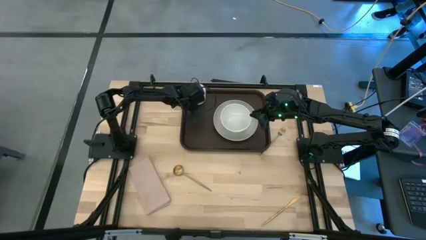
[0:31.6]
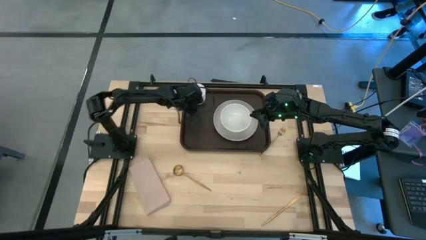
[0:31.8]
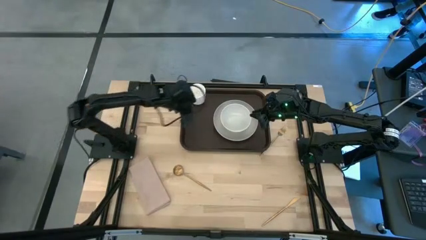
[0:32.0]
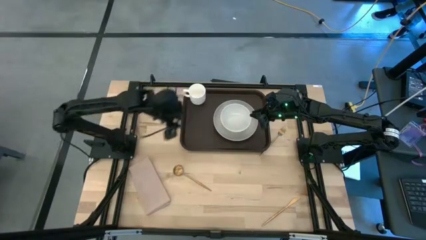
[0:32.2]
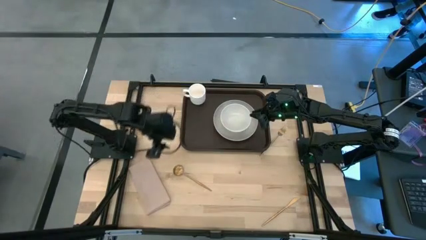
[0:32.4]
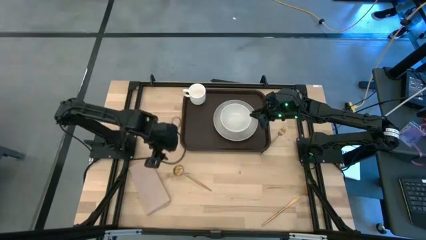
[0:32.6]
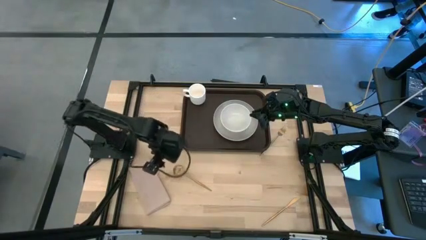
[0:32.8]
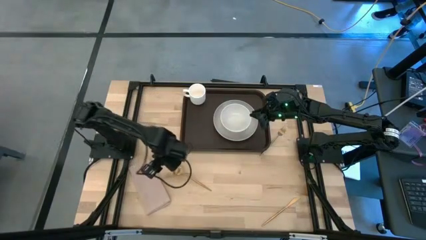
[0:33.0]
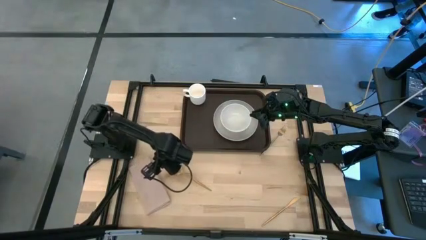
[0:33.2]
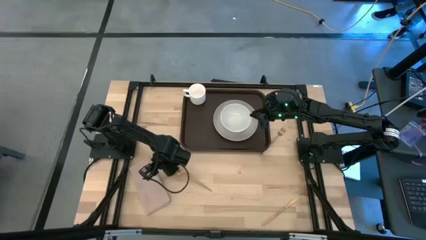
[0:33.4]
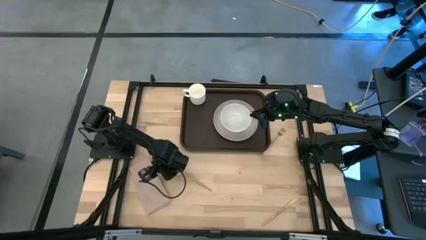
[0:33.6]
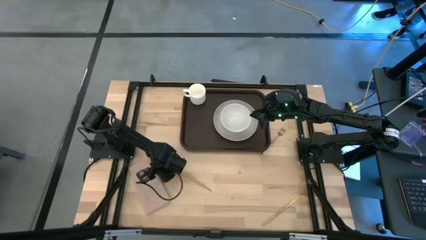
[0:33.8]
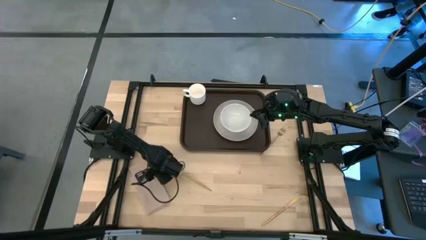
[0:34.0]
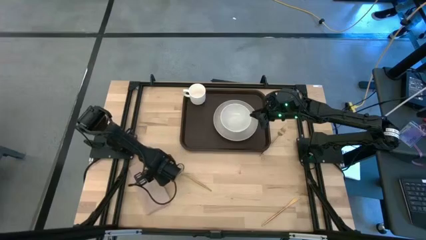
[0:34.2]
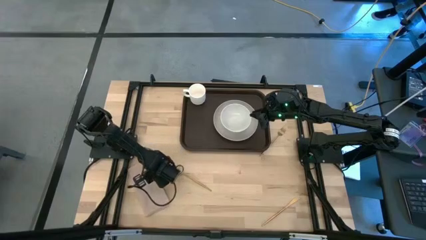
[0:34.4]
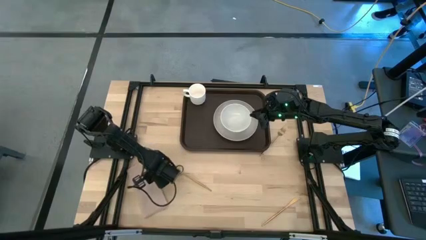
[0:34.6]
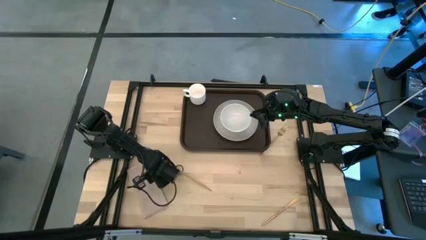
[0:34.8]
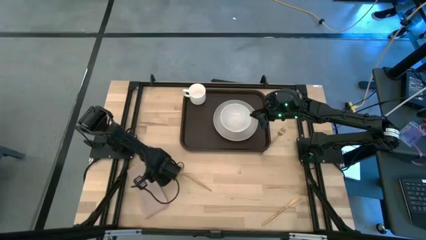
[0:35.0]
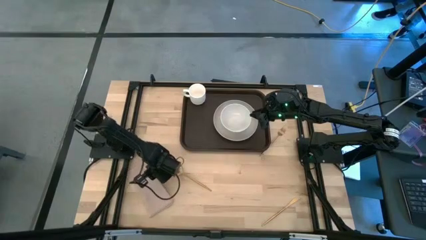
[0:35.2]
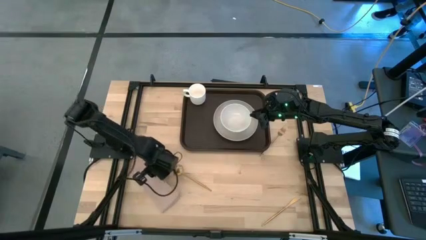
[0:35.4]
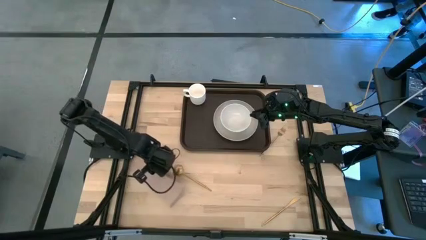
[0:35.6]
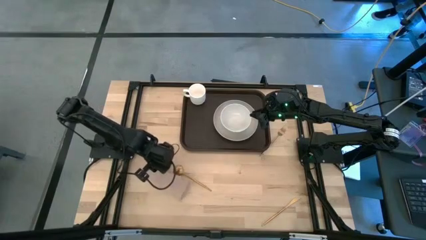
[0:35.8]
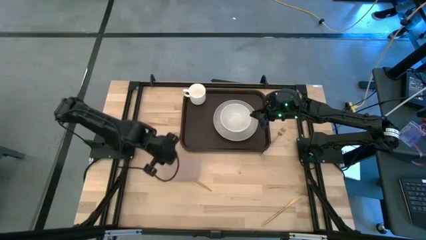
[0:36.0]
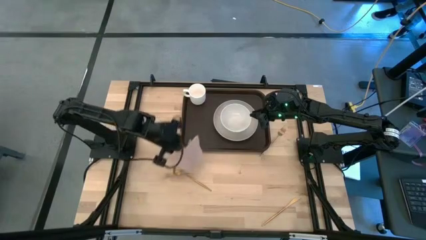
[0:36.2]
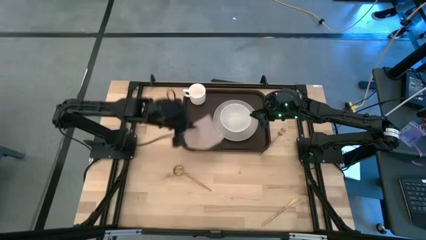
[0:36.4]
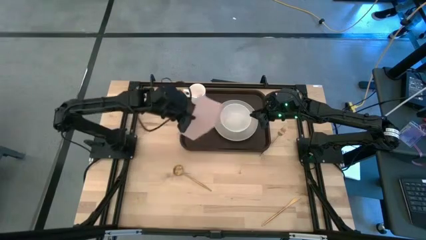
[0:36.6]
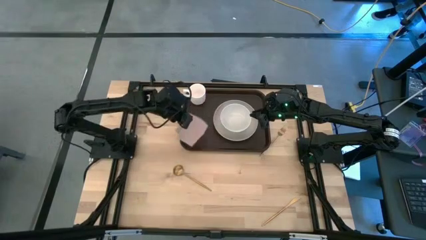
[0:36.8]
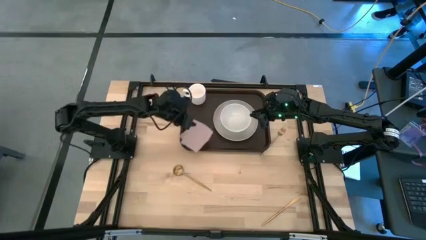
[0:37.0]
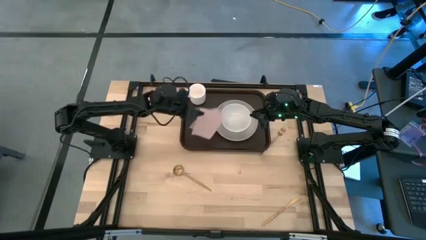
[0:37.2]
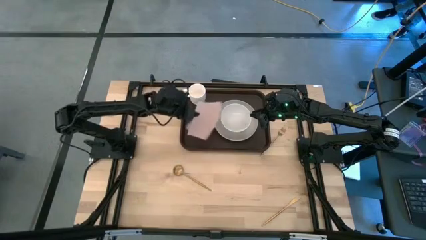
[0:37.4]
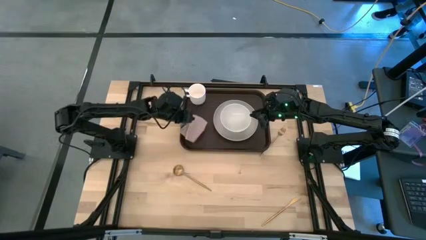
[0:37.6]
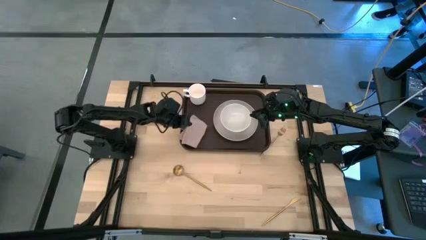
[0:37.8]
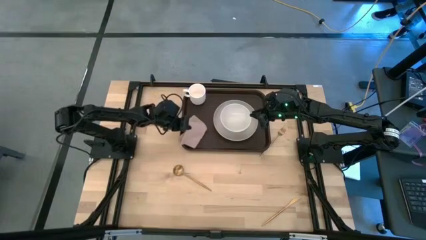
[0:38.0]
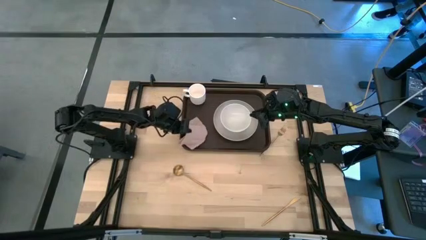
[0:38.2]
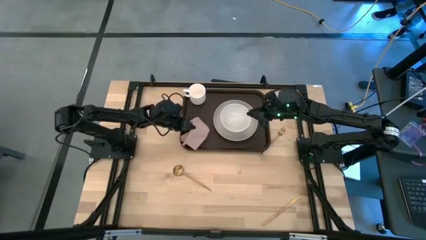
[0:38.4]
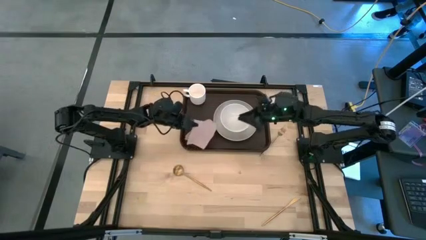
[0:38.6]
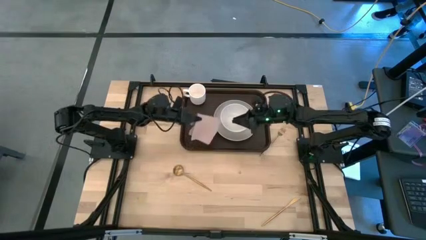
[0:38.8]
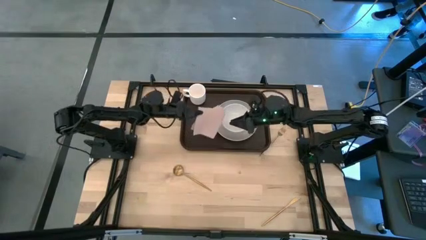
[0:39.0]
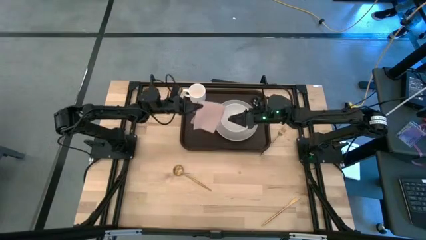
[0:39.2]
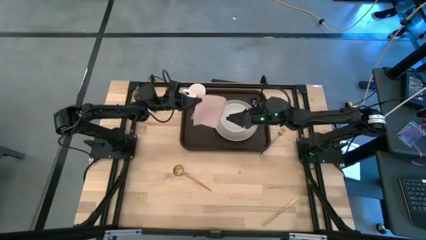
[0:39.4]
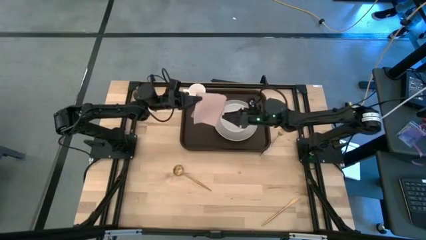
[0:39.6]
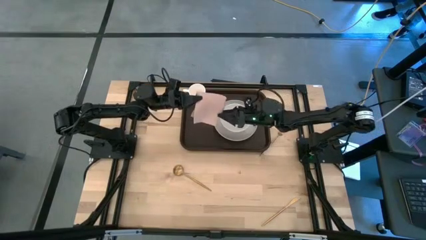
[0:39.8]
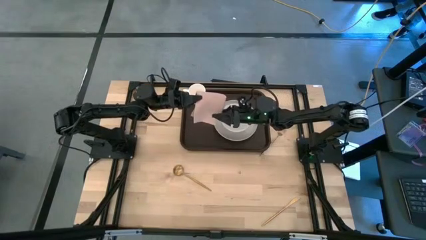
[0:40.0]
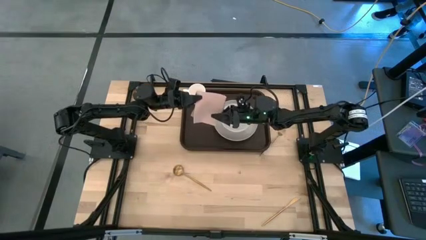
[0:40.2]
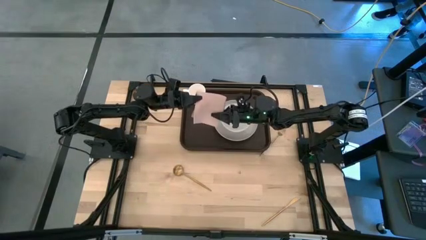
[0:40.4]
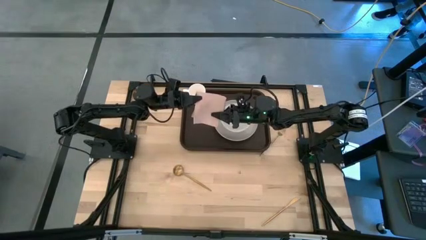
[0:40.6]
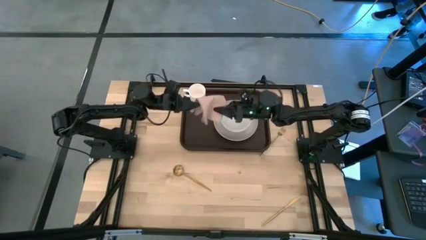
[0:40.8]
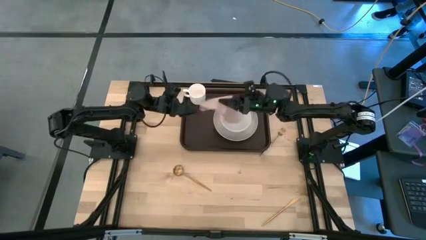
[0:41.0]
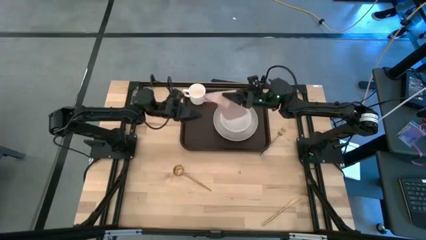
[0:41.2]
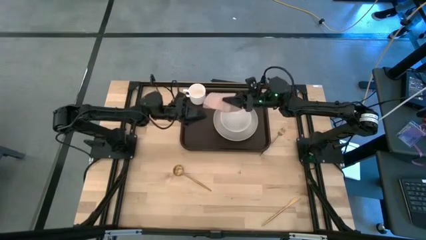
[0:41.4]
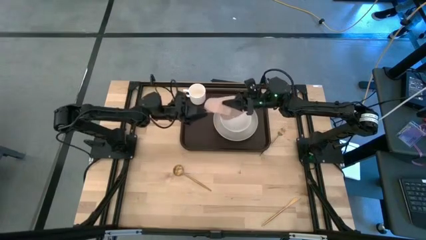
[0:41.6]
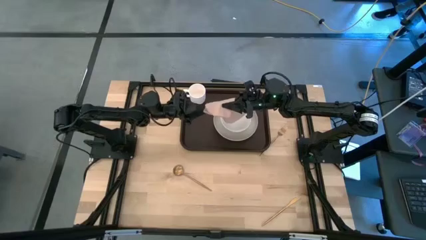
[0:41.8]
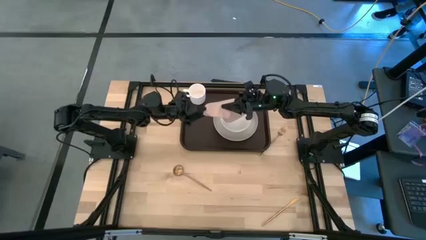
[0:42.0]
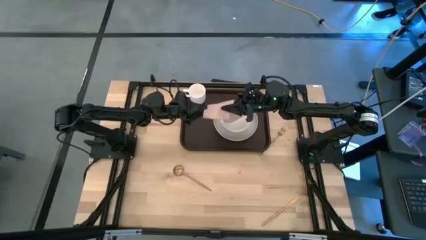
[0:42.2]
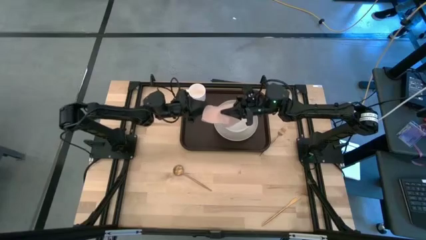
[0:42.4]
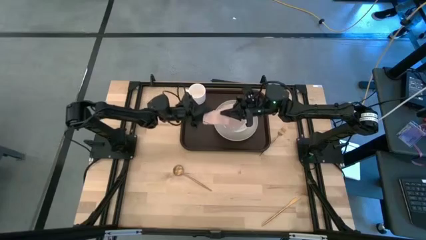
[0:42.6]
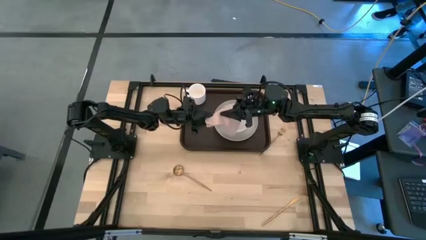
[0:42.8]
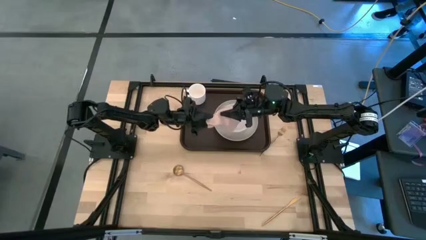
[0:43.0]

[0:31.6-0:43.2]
Task: Set up tray
Put the light brown napkin on the brown serving tray to the left of the gray plate
